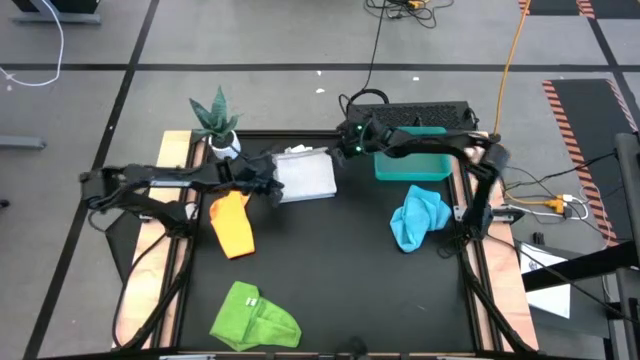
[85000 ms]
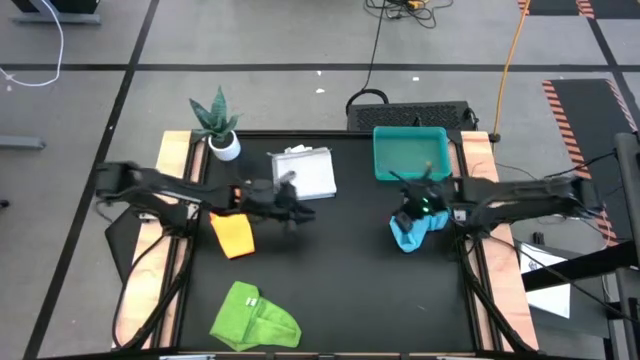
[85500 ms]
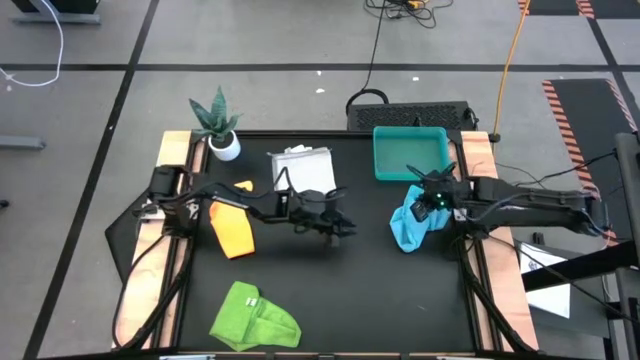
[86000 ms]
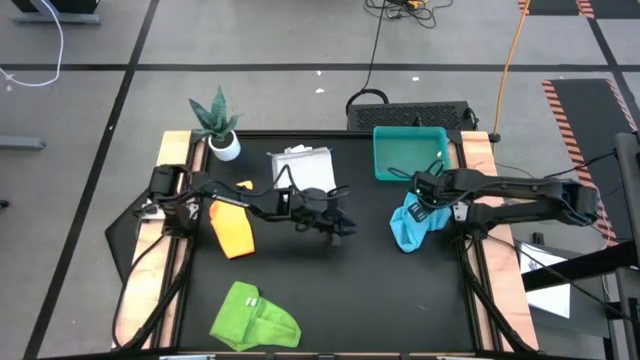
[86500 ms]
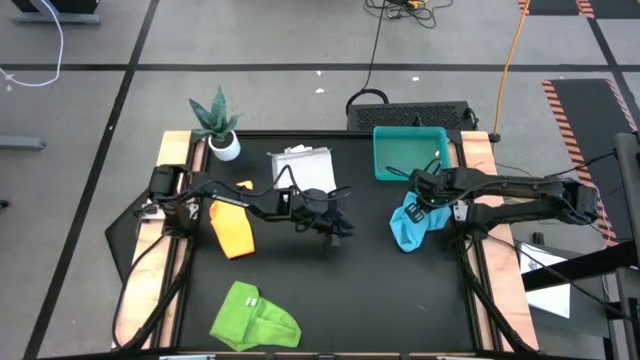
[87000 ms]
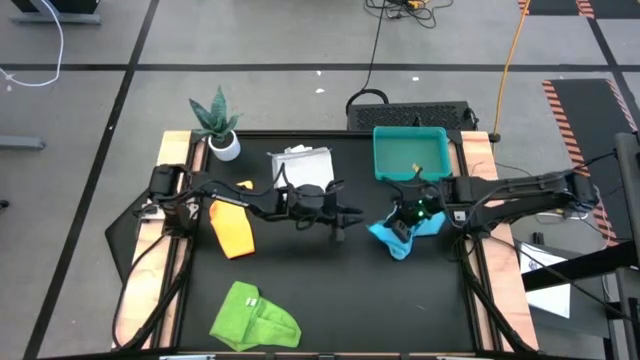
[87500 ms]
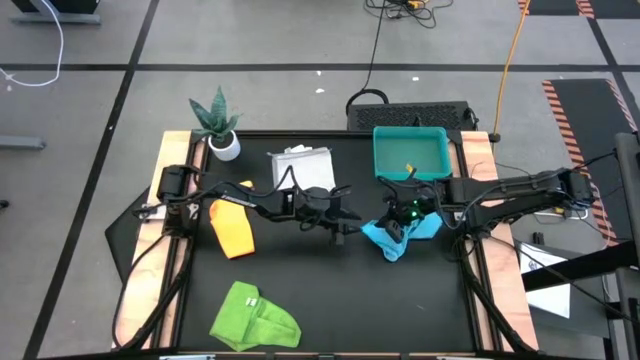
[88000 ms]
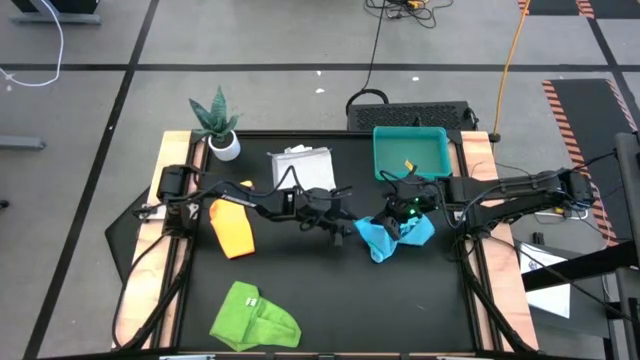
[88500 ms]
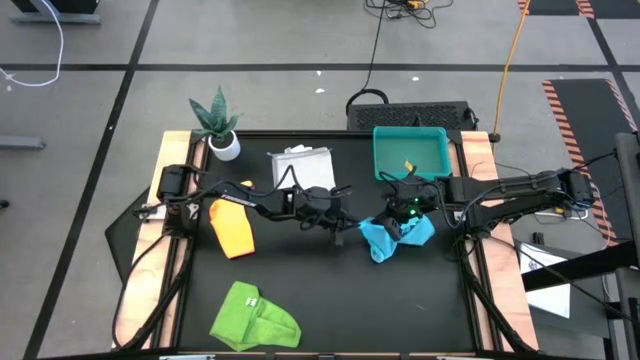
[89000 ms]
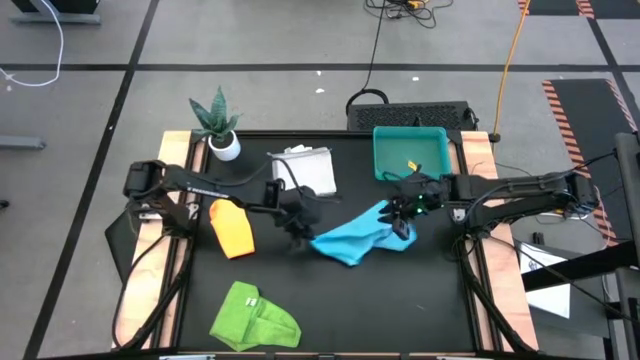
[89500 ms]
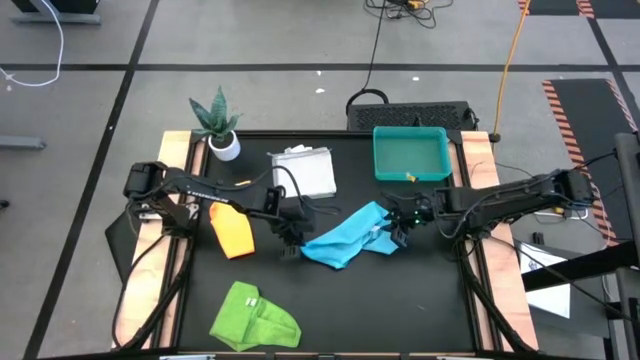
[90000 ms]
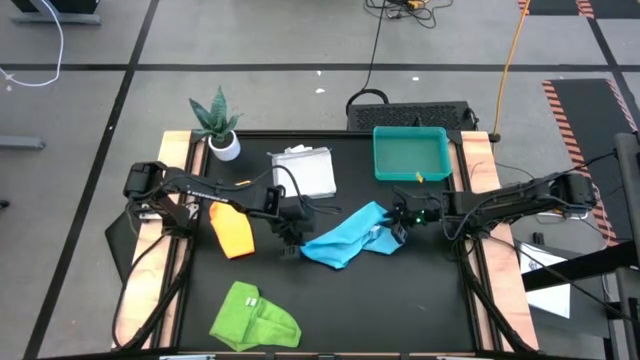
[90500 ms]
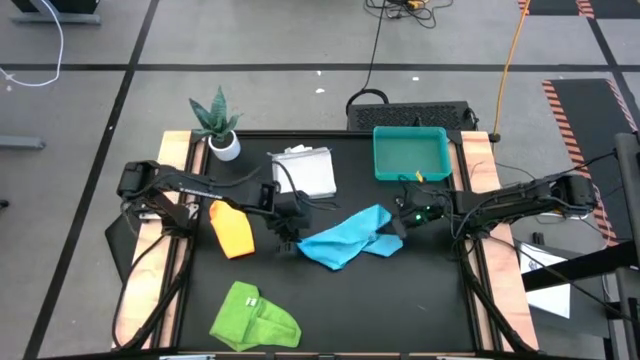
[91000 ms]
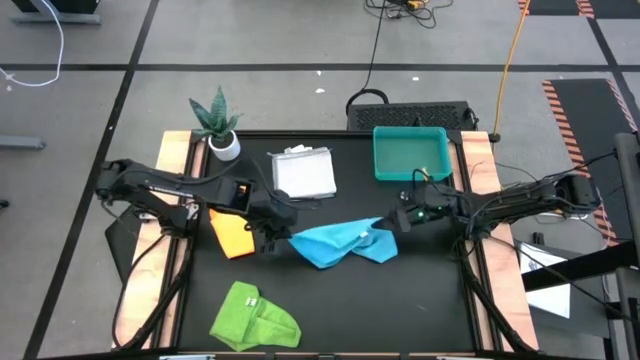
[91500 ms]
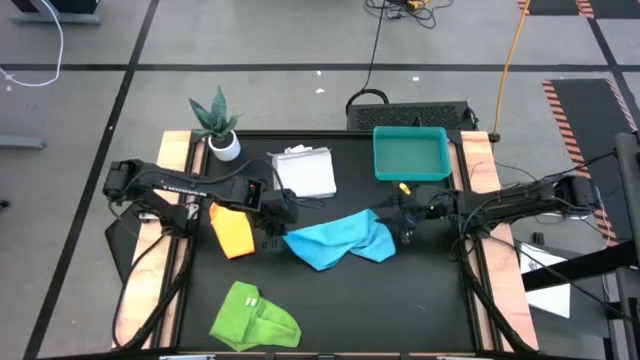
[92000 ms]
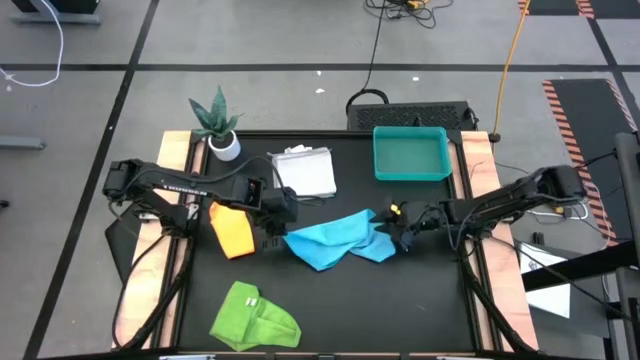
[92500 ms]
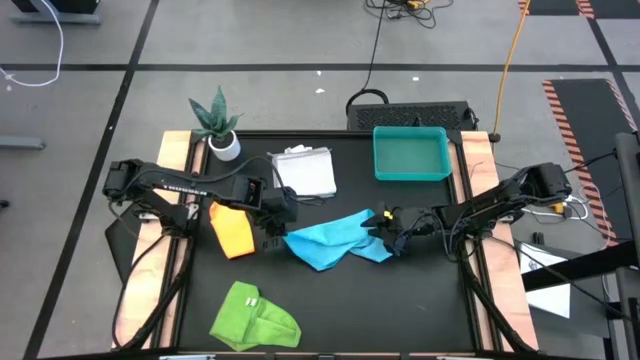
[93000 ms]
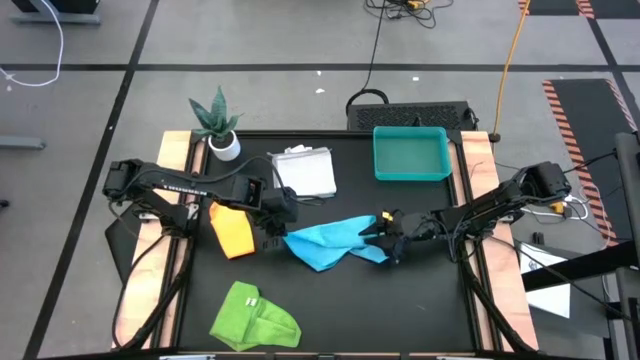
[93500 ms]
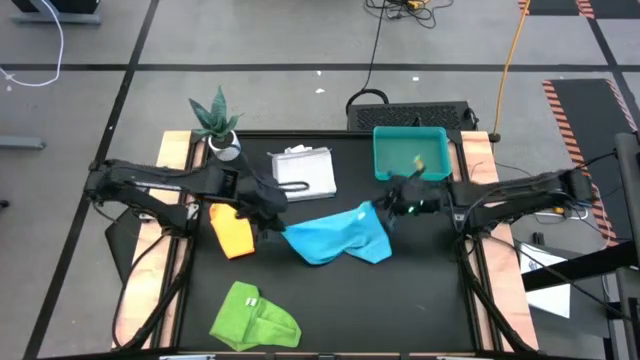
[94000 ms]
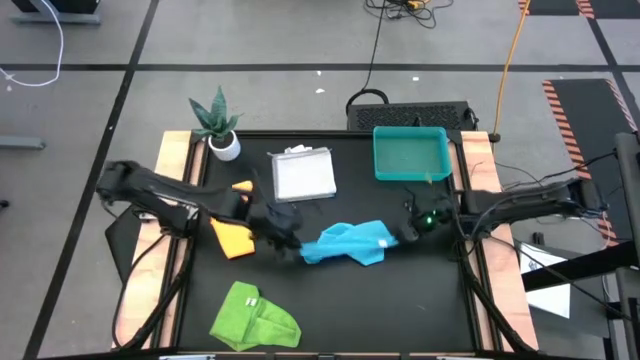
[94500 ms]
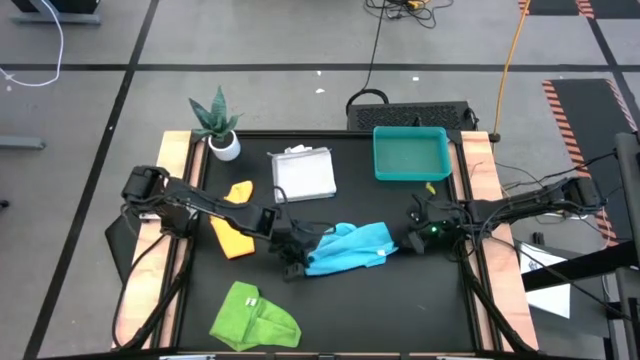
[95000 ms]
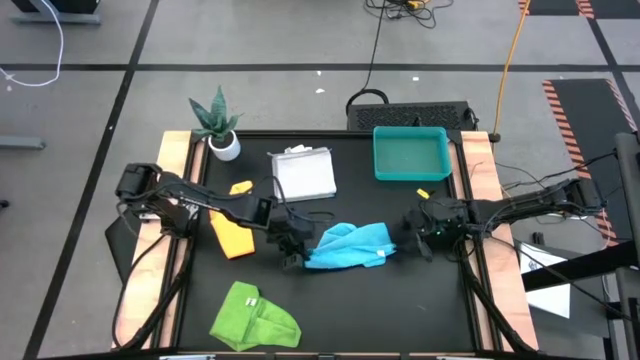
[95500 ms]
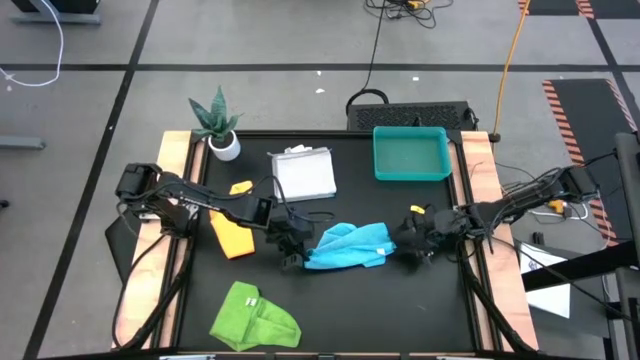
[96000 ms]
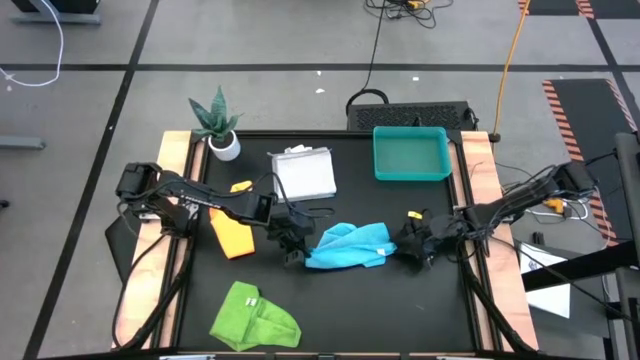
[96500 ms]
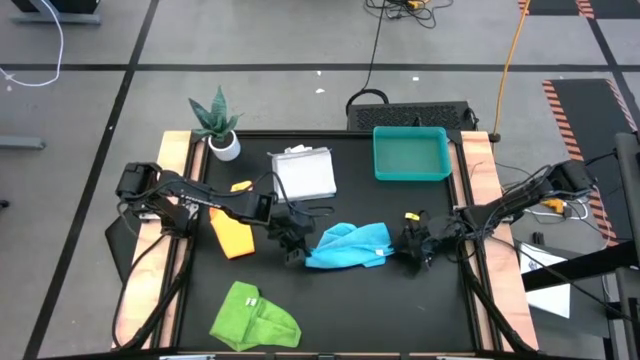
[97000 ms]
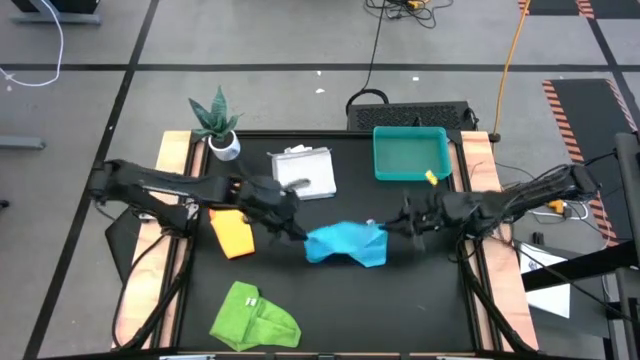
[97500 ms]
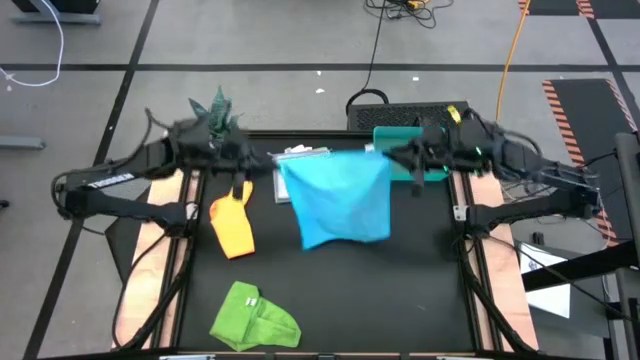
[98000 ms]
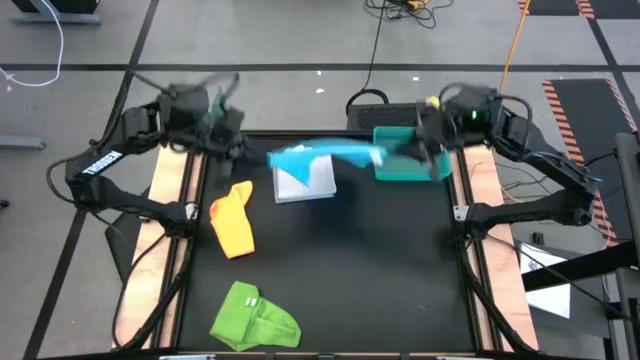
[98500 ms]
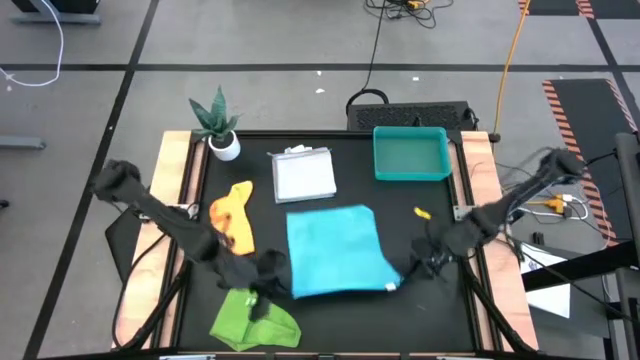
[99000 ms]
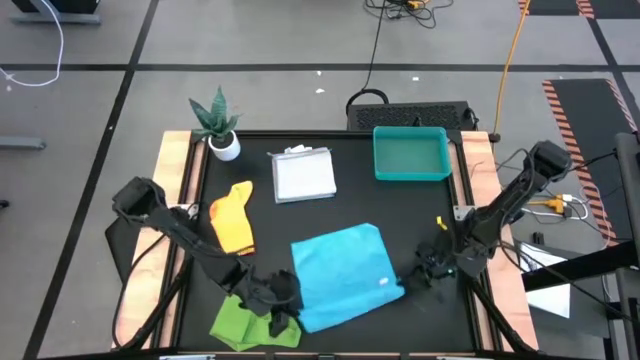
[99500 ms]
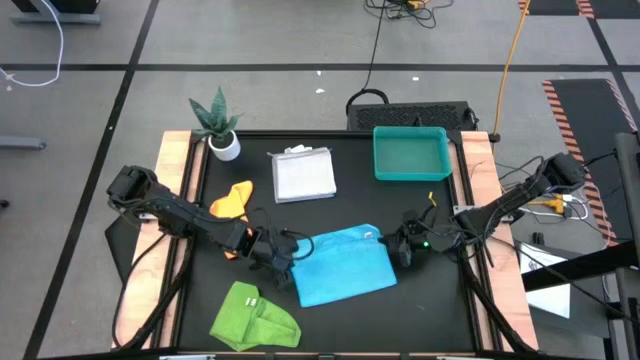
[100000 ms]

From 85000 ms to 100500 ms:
Task: Fold microfiber towels
Fold the blue microfiber towel

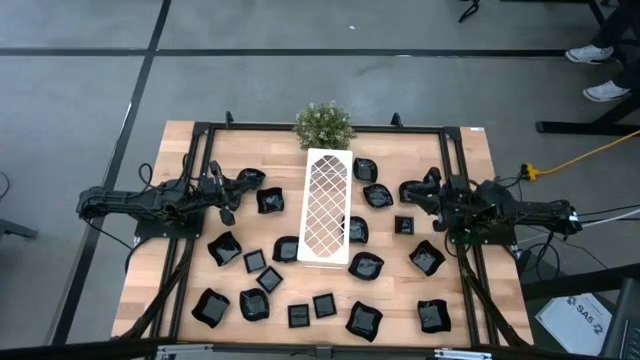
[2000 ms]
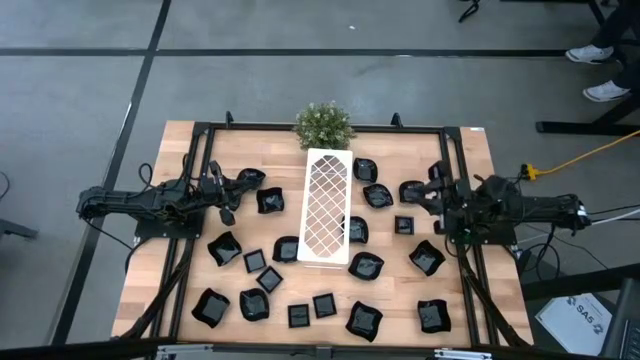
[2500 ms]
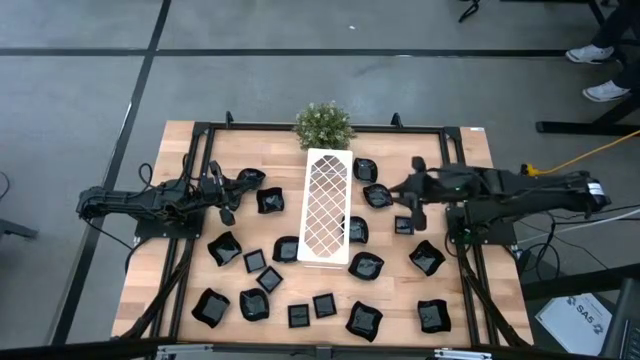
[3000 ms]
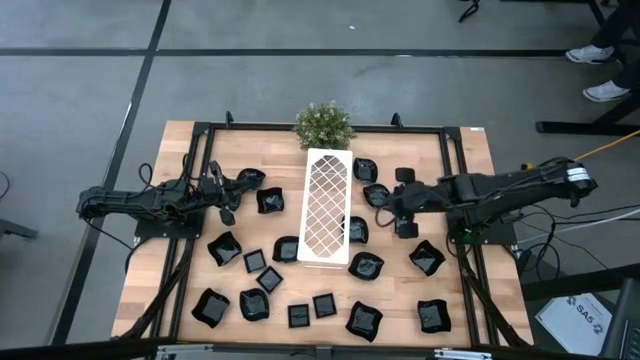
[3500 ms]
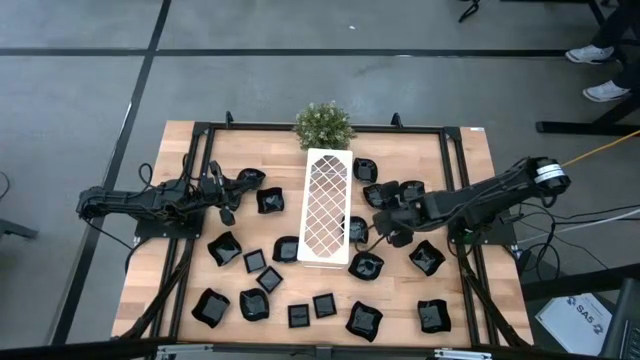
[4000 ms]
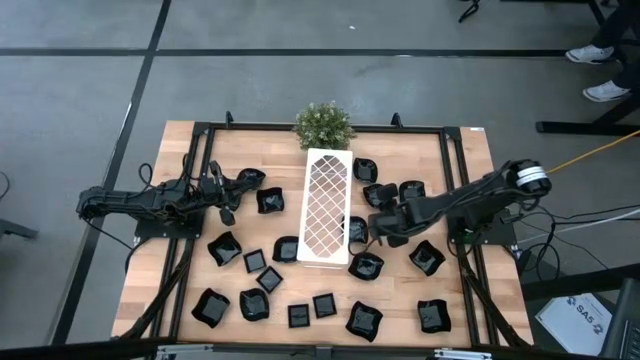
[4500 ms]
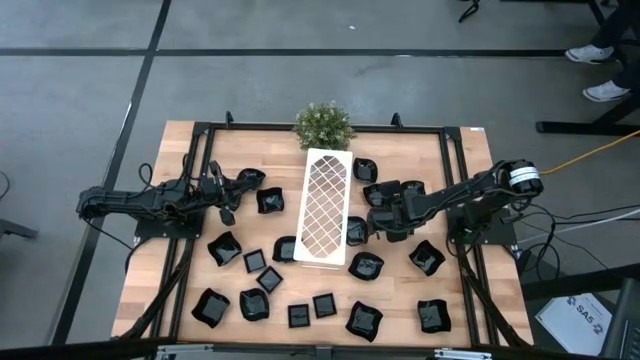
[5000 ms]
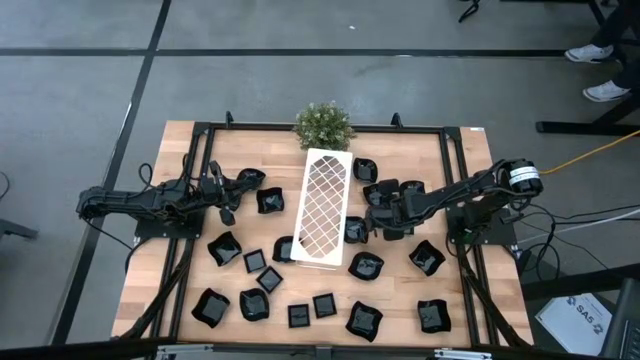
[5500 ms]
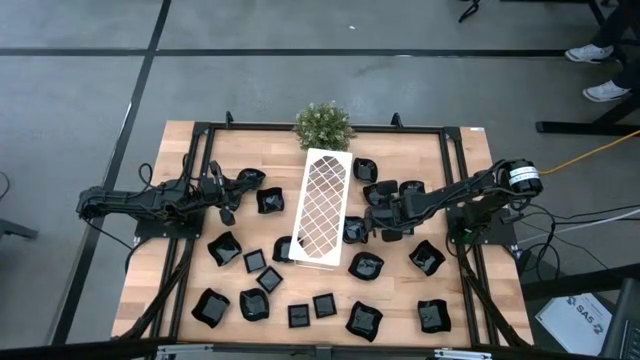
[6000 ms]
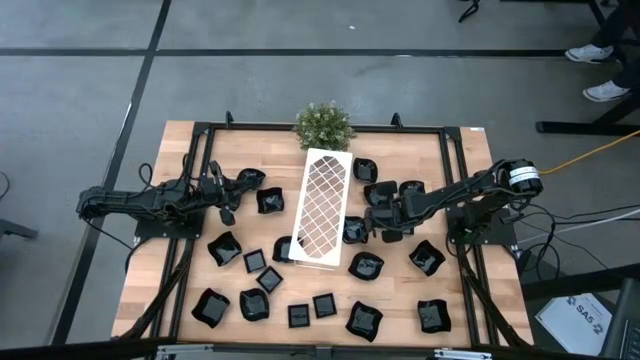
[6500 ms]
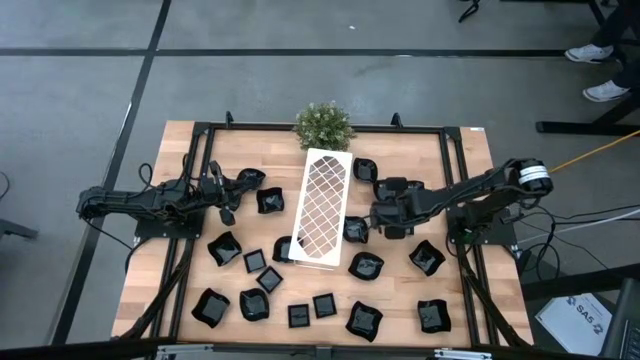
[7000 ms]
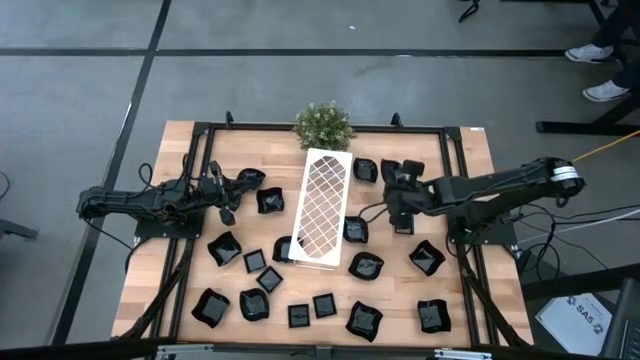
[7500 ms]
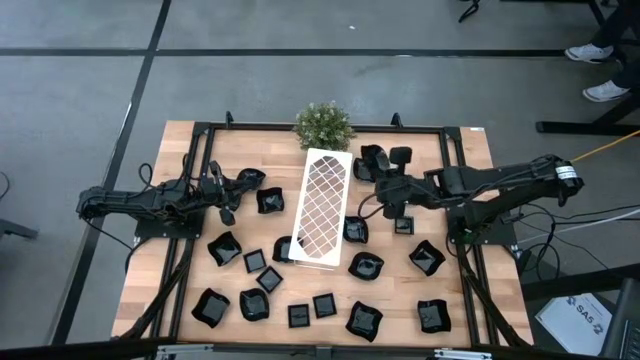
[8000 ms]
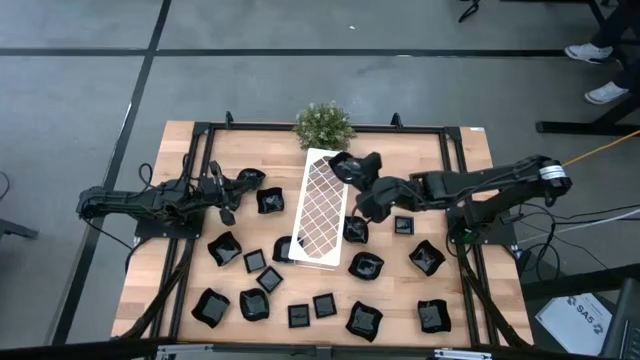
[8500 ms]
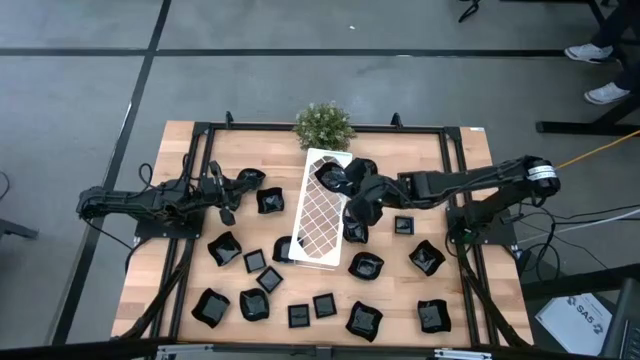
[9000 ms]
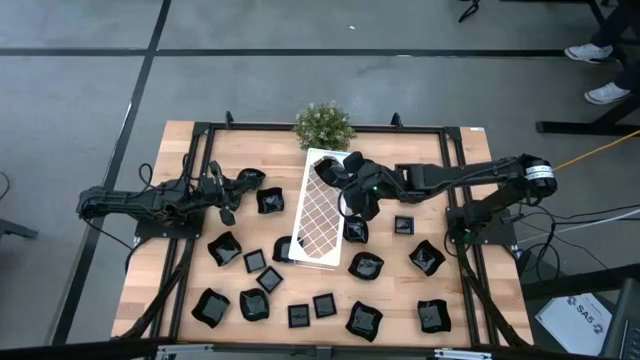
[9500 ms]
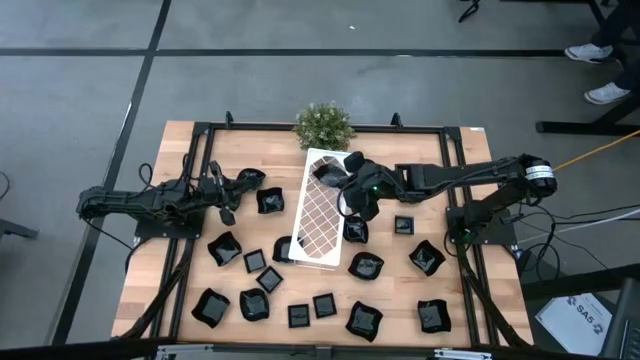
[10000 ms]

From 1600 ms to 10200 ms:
Task: Pick & Place Mini shaped plates
Put the leaf shaped plate on the shelf
